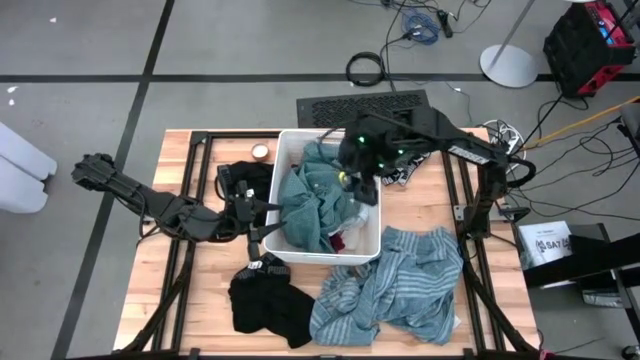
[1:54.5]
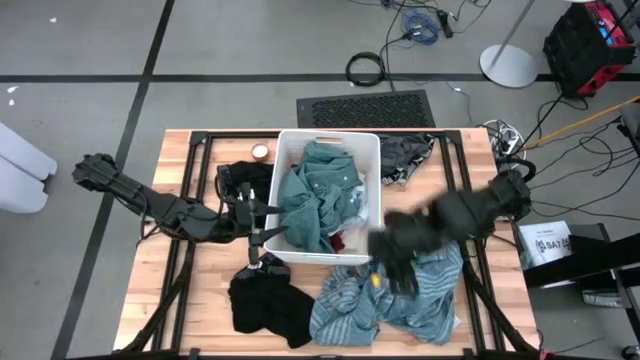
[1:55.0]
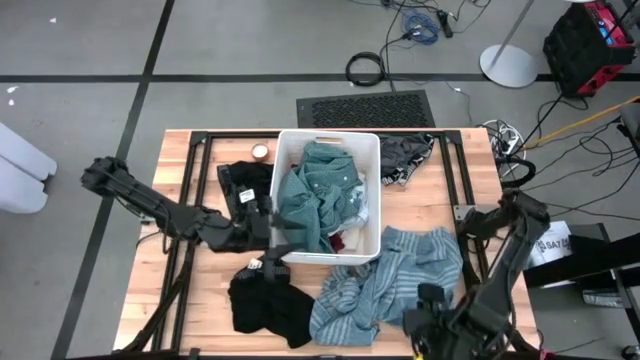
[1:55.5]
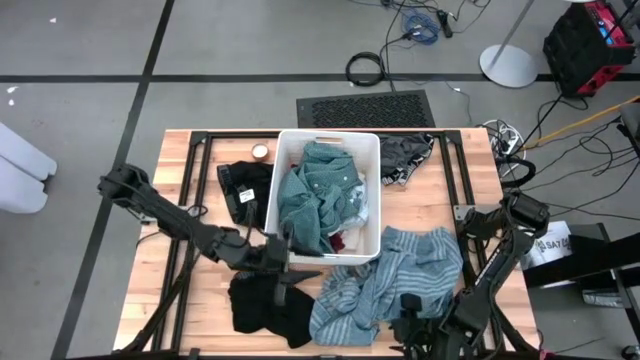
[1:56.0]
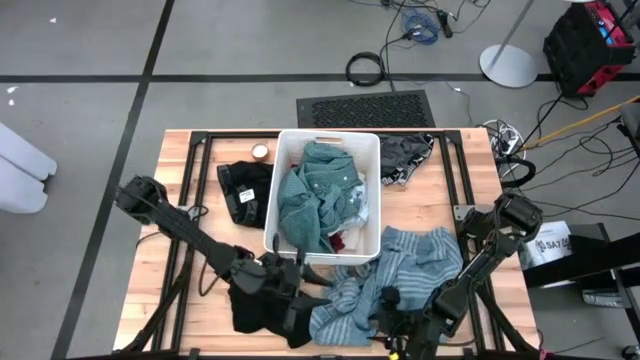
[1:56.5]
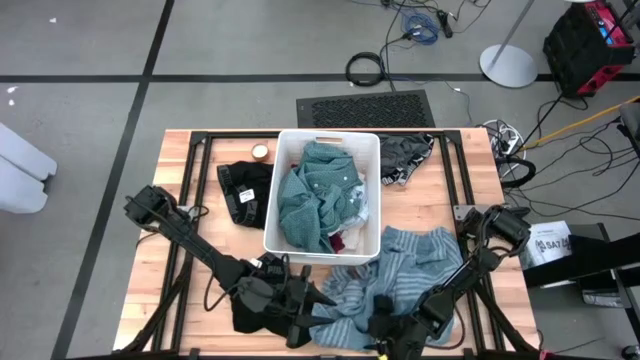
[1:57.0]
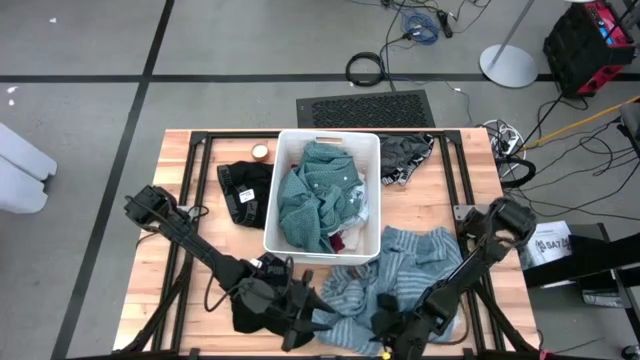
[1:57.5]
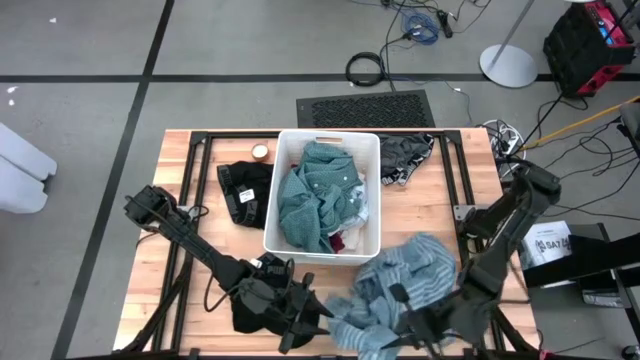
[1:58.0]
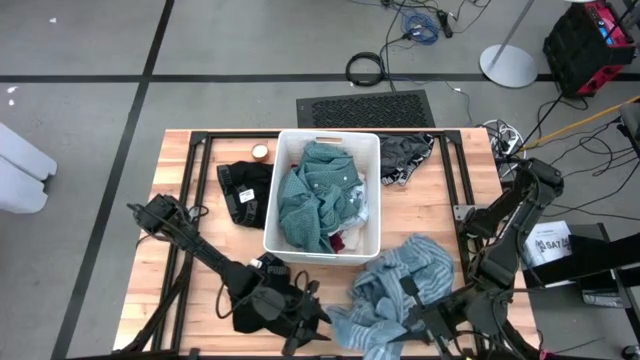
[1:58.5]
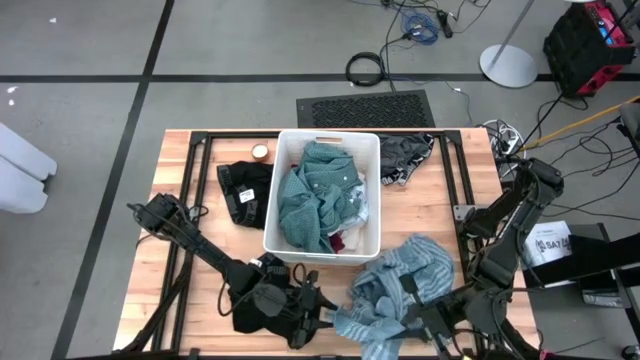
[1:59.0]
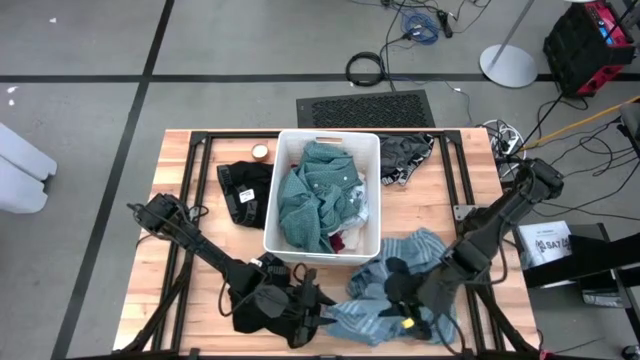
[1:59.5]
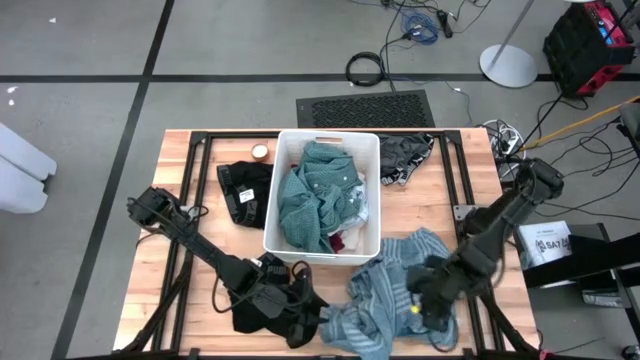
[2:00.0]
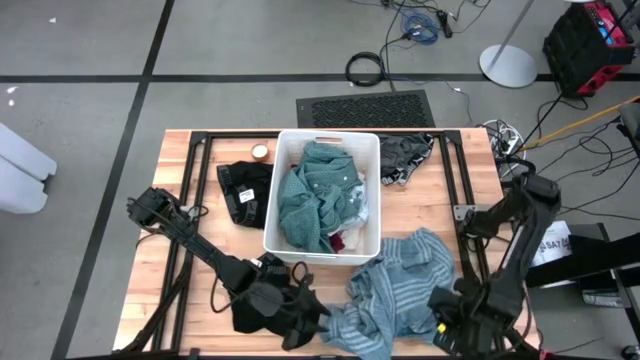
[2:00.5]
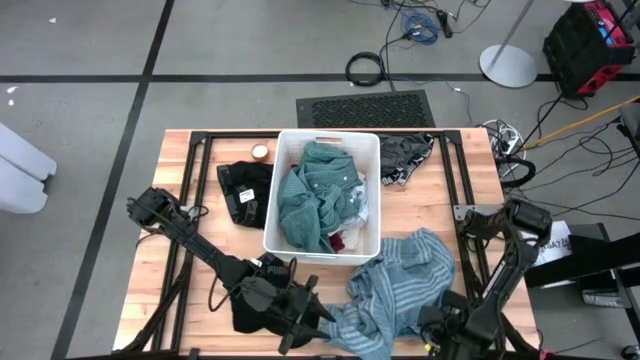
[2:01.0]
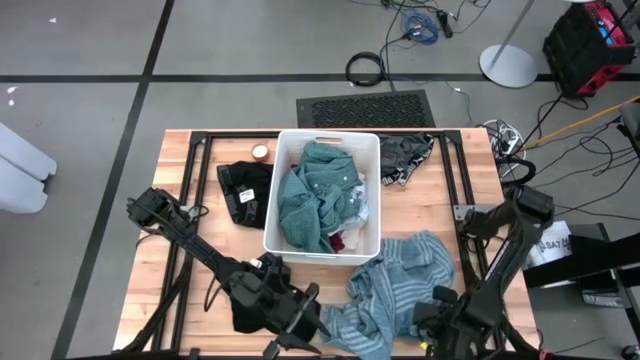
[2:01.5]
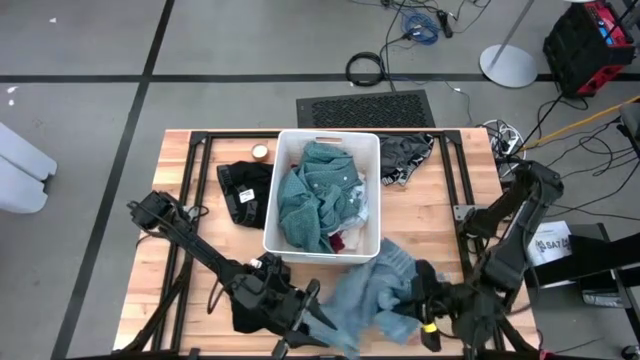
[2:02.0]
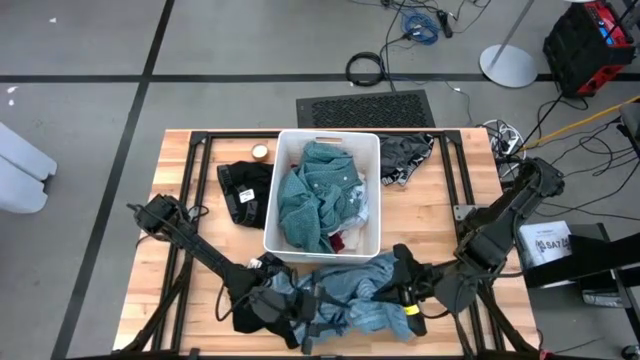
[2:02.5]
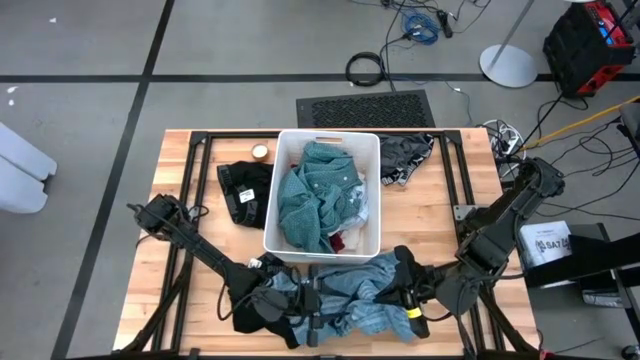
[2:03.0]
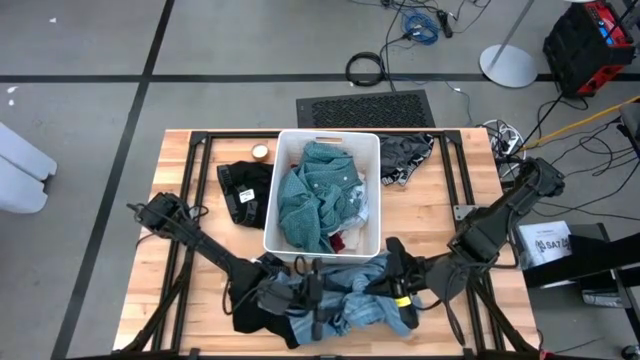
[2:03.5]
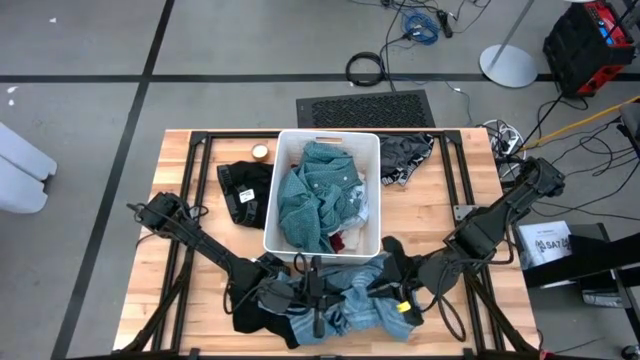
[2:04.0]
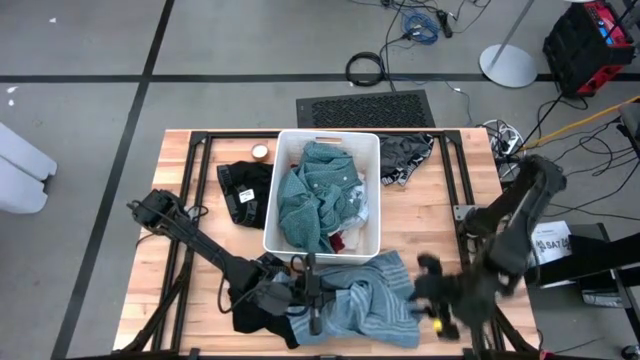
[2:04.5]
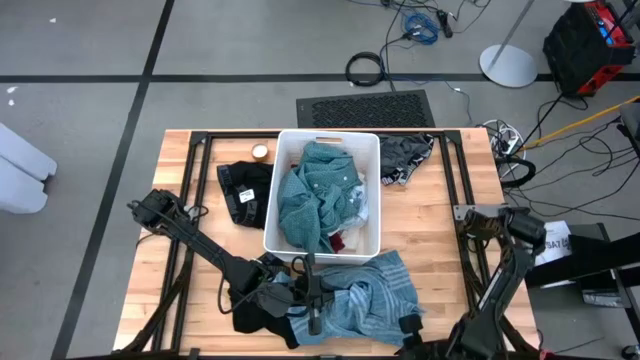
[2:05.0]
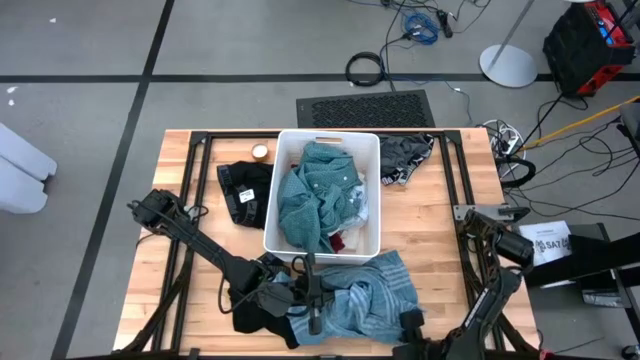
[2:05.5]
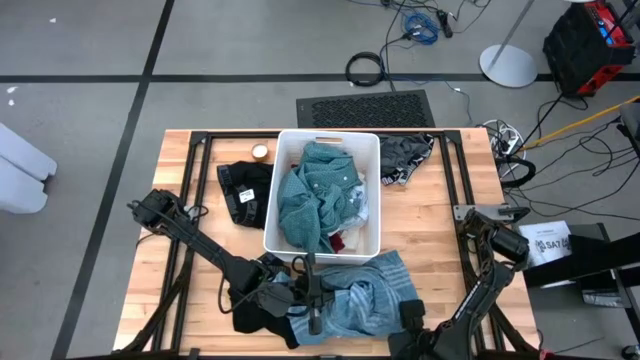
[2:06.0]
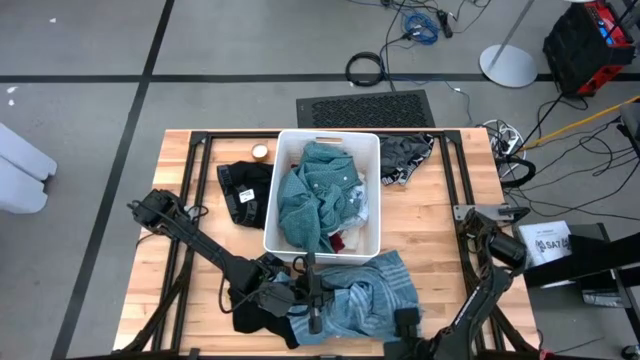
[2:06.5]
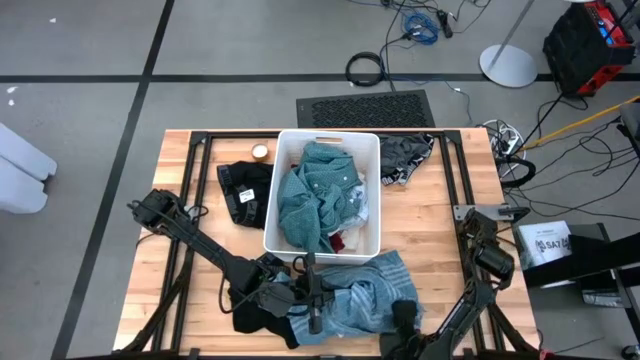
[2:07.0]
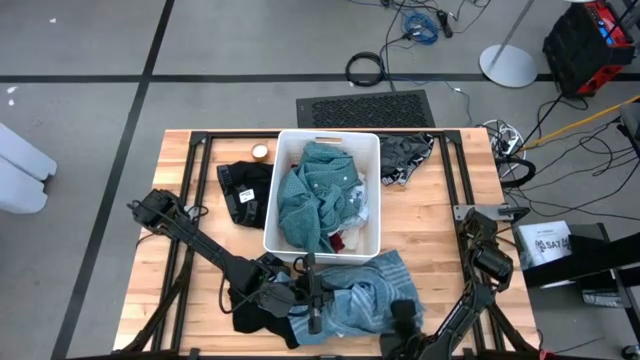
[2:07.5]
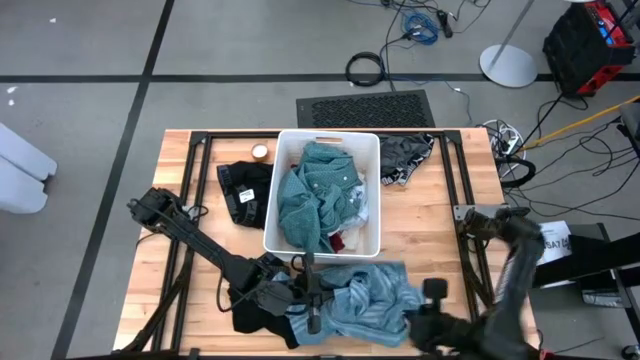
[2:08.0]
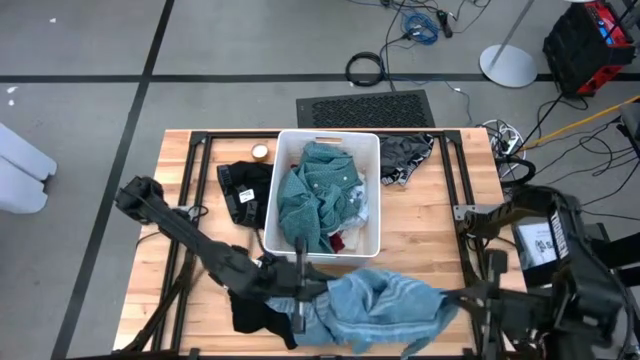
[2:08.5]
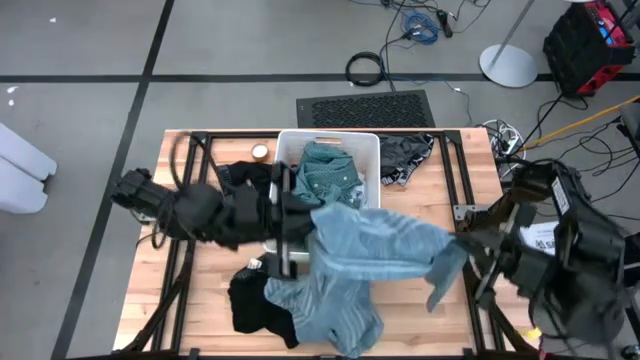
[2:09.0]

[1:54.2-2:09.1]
Task: Sort clothes
Put the blue patterned shirt into the laundry bin

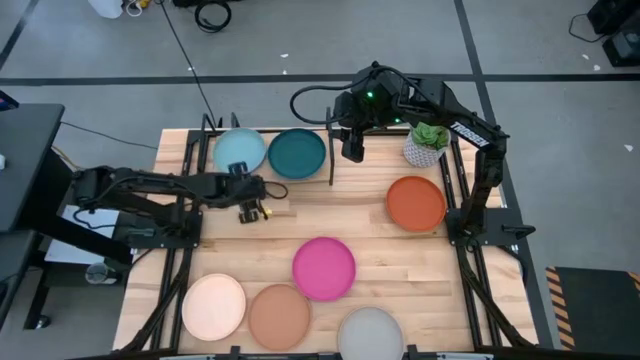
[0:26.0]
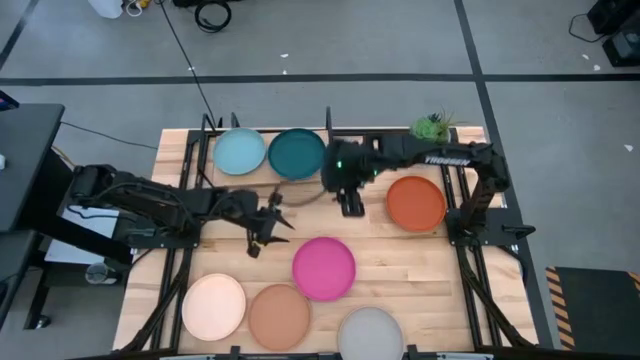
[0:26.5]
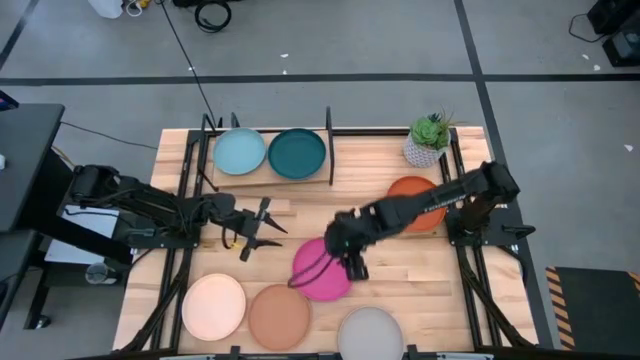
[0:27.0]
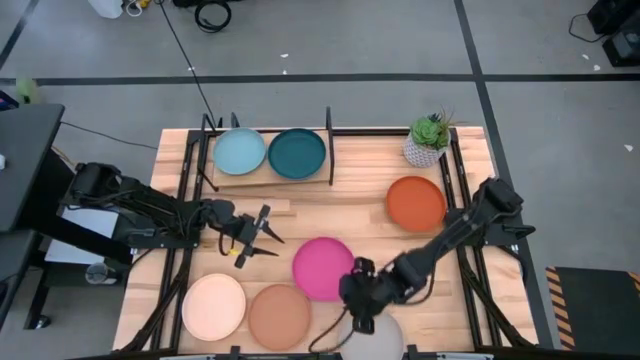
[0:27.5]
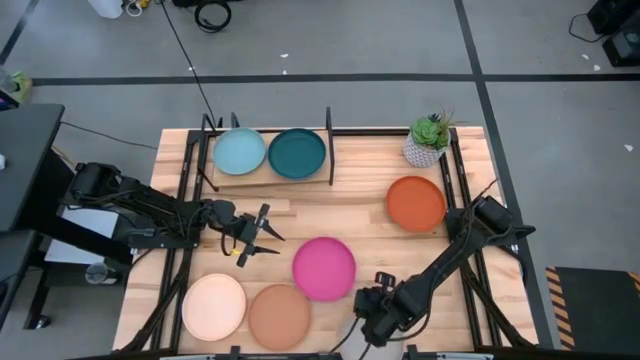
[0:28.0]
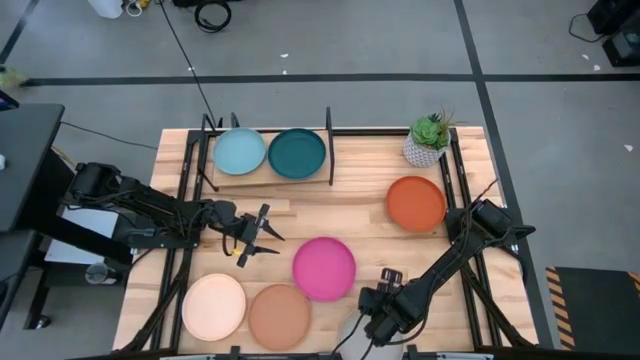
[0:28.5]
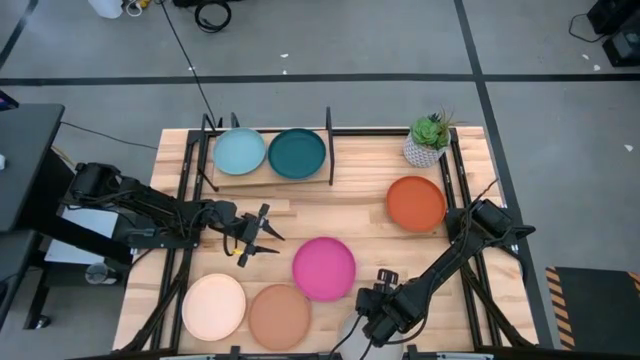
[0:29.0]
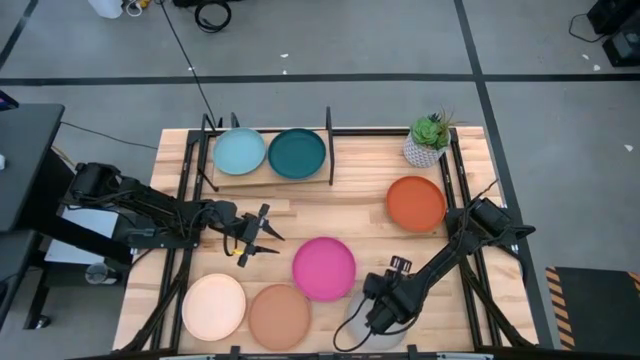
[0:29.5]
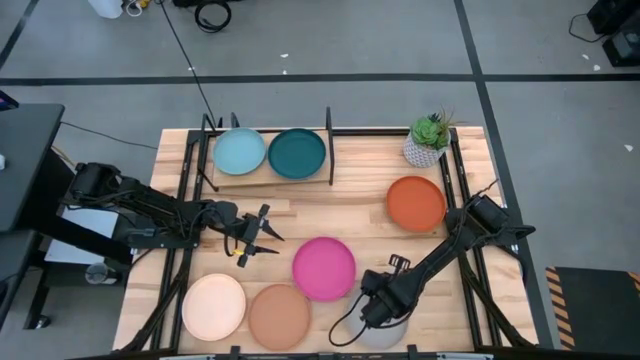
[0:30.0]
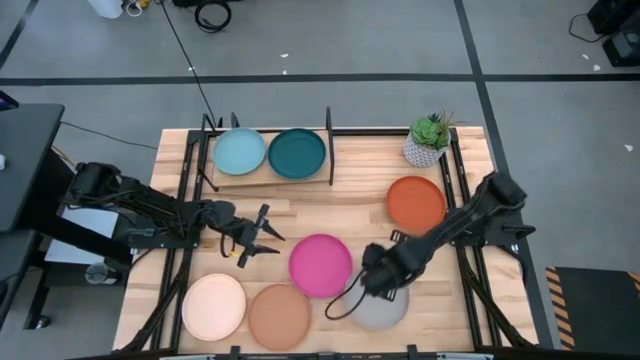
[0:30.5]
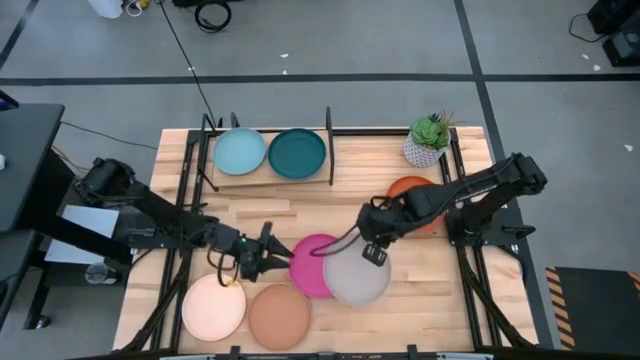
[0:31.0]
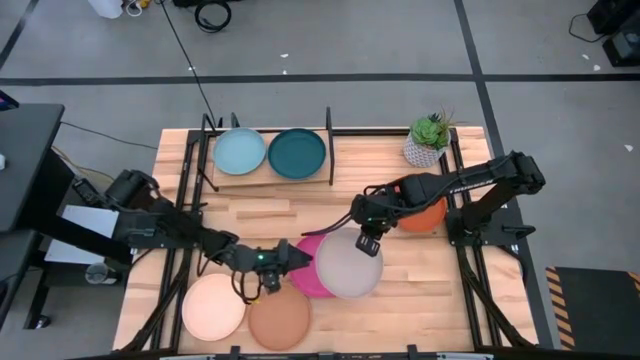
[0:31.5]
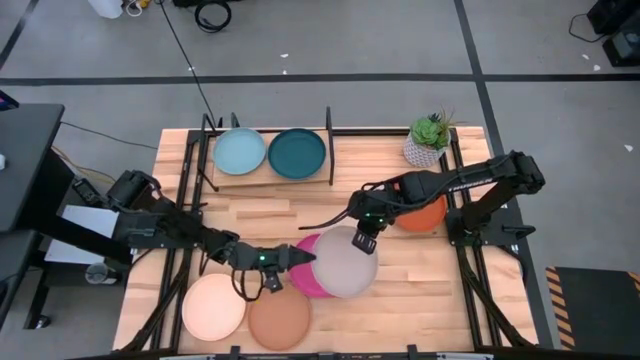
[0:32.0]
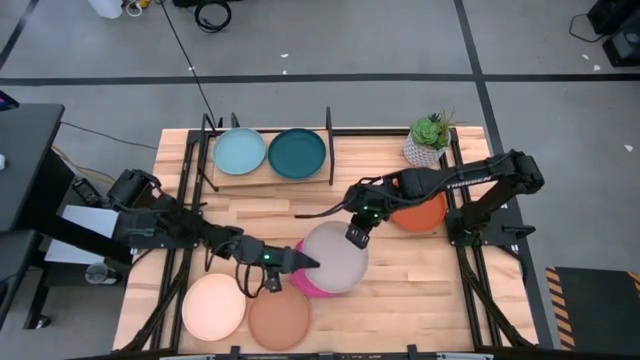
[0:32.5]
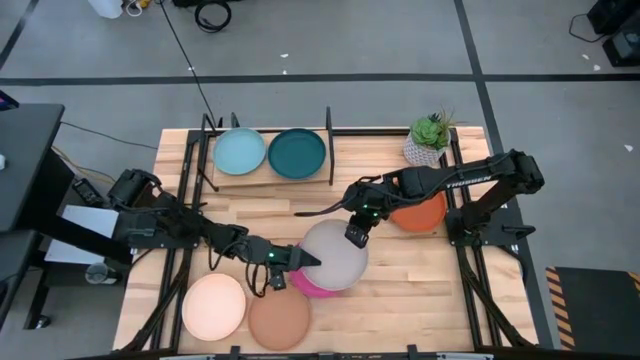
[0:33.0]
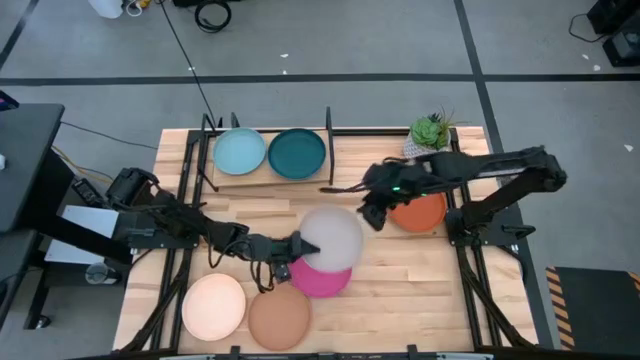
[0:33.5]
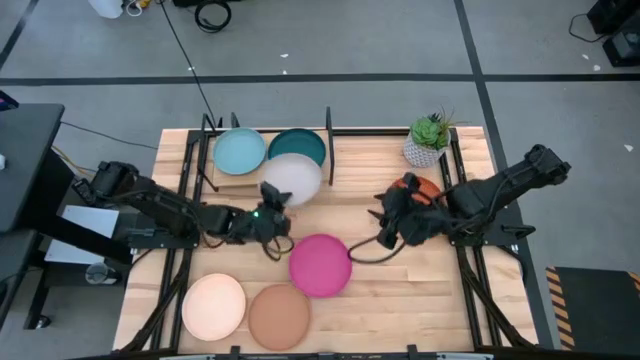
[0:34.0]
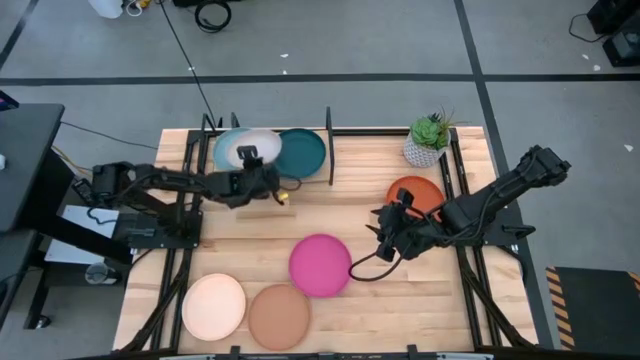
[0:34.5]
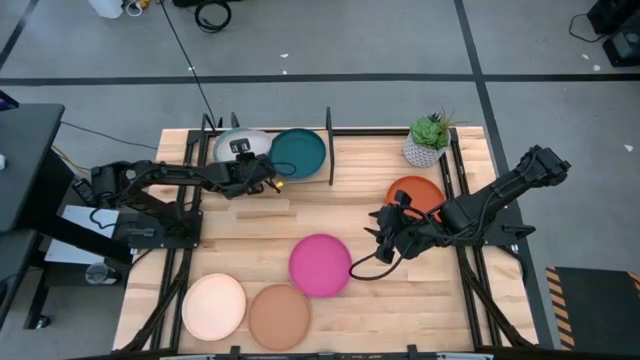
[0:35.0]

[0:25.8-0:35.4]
Task: Place and stack plates onto a shelf
Stack the gray plate on top of the light blue plate on the shelf
